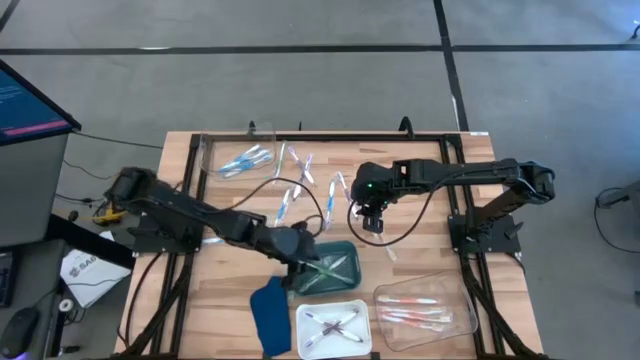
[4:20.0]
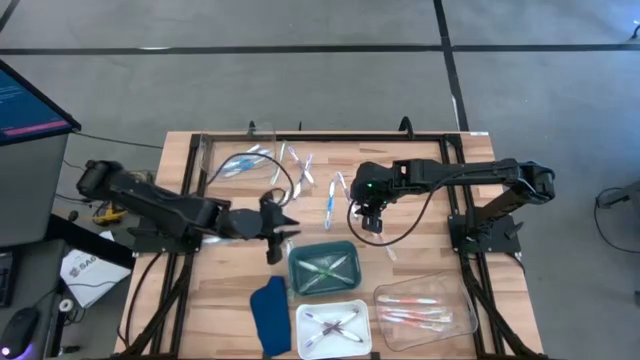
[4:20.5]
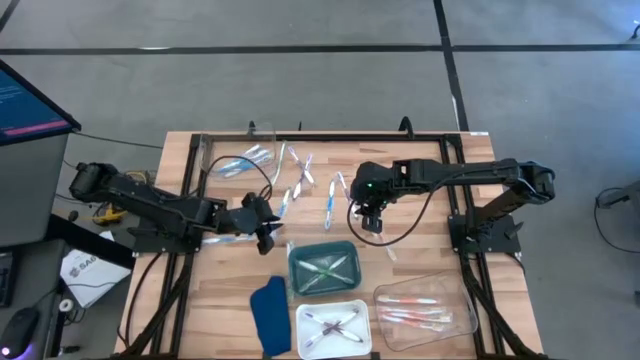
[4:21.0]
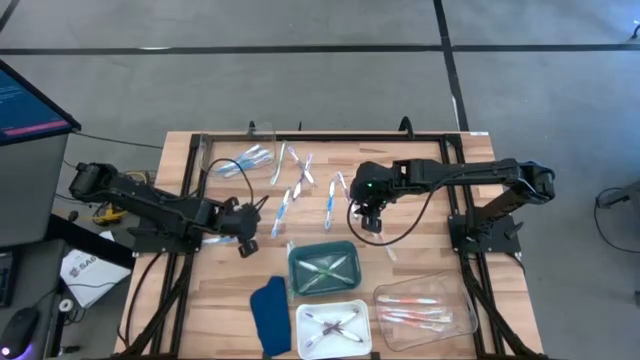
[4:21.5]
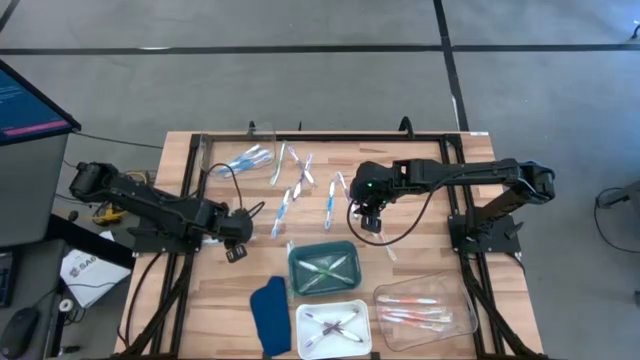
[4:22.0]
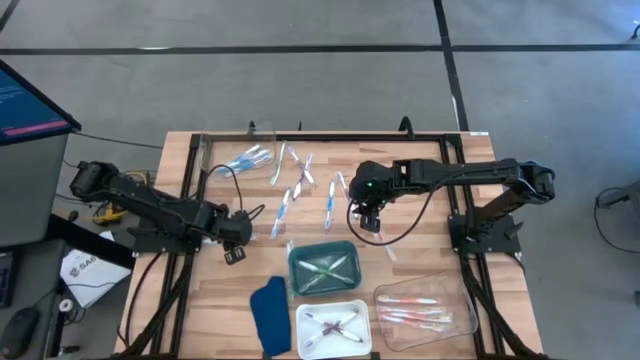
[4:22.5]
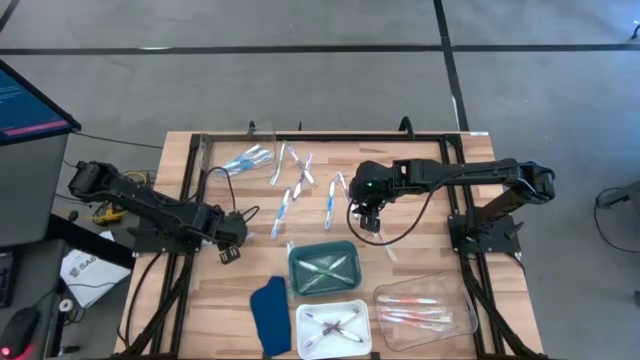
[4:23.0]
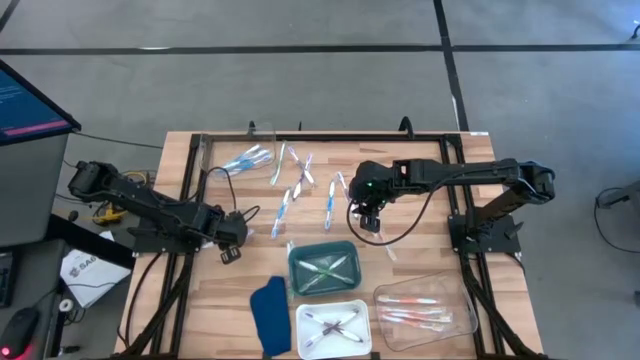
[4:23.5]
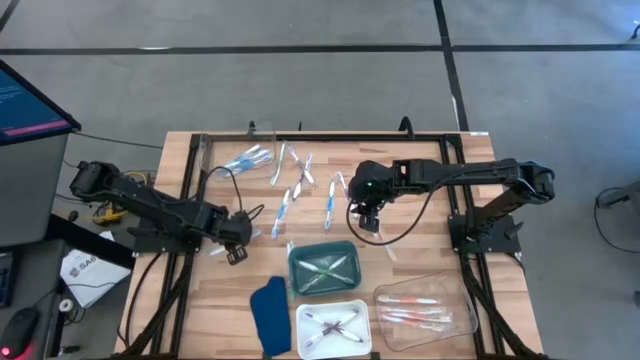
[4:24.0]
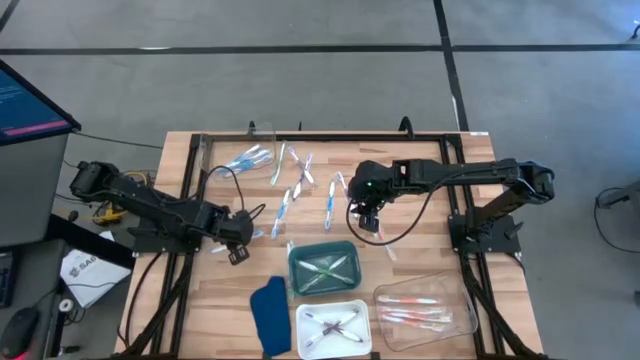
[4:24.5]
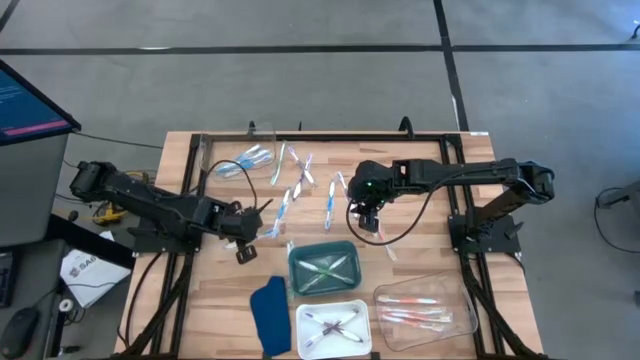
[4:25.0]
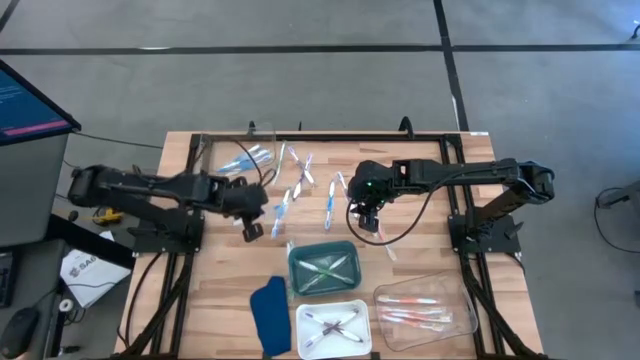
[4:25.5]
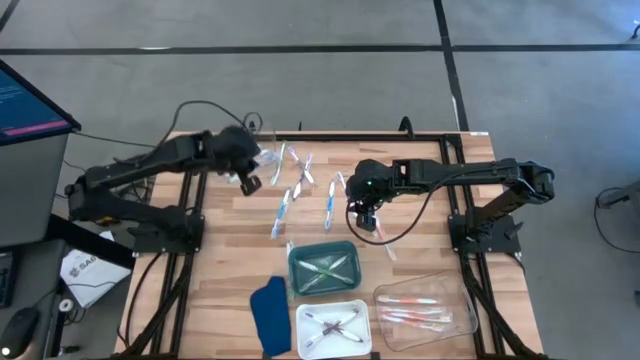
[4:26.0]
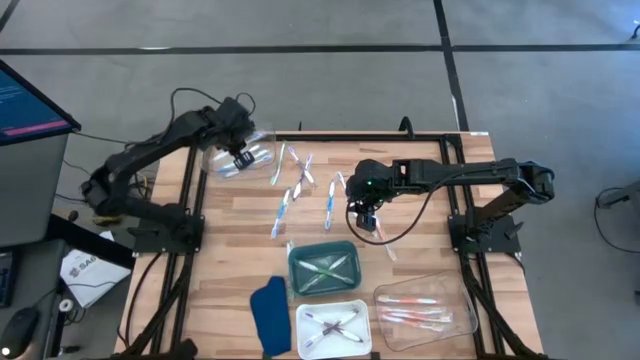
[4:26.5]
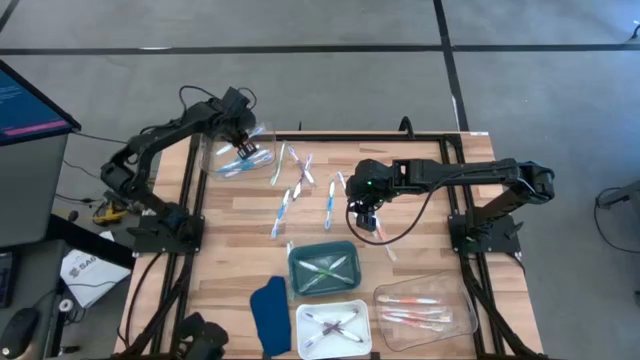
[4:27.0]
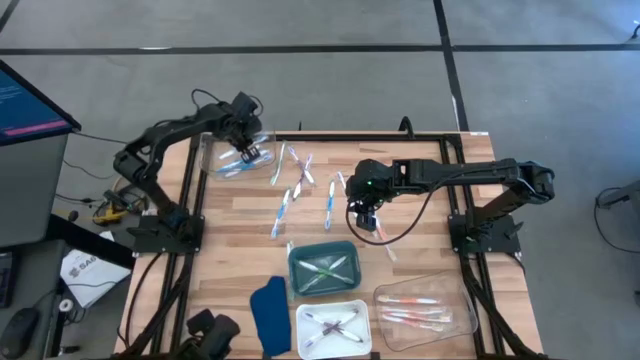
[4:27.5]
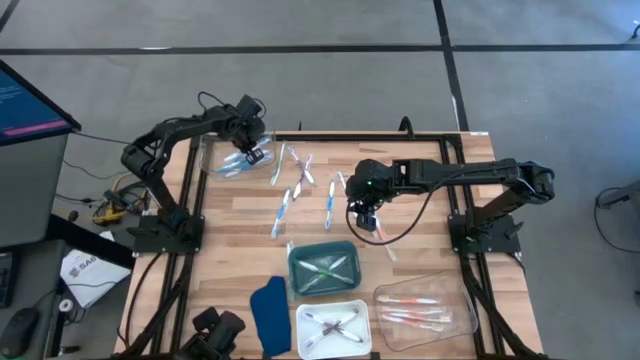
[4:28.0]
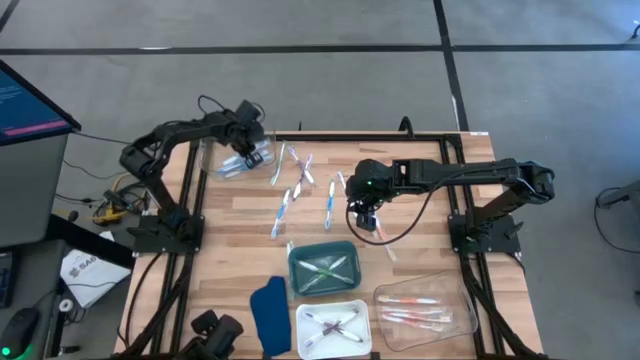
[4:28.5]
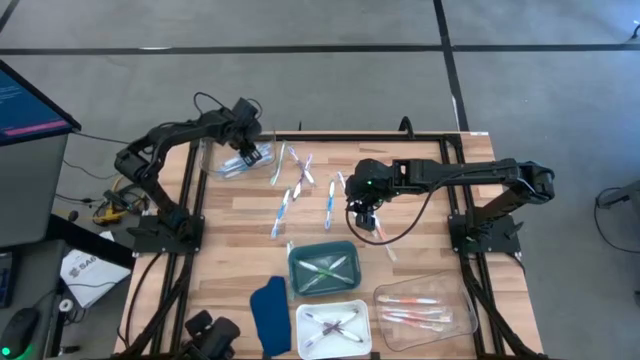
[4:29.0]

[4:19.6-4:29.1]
Task: Pick & Place Toothbrushes
Put the blue toothbrush into the top transparent bin

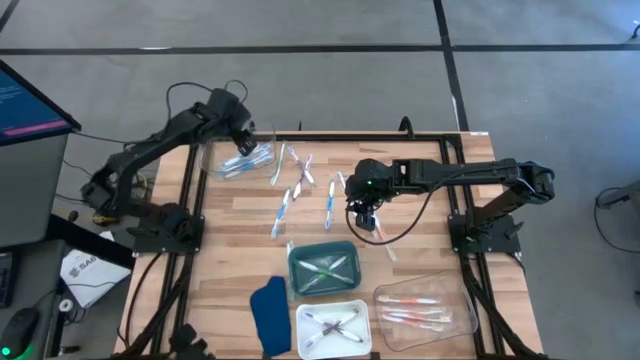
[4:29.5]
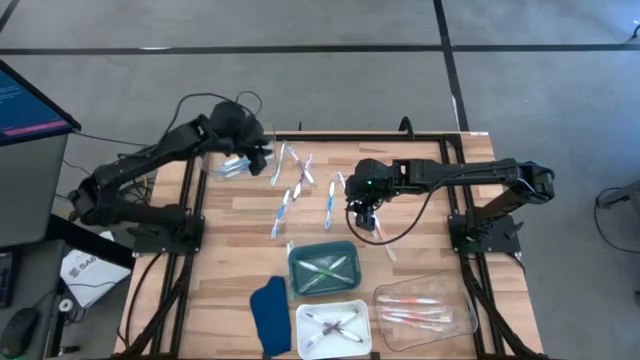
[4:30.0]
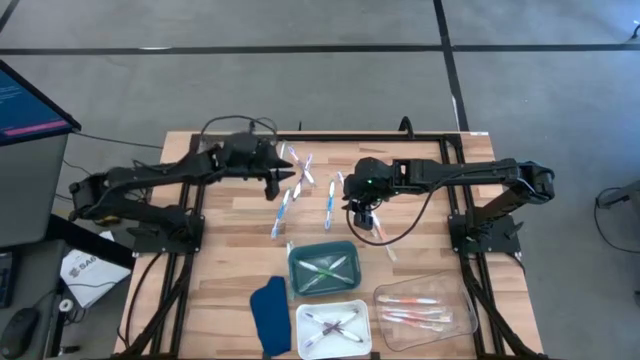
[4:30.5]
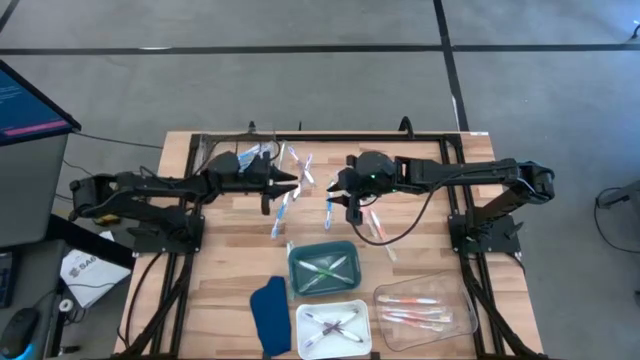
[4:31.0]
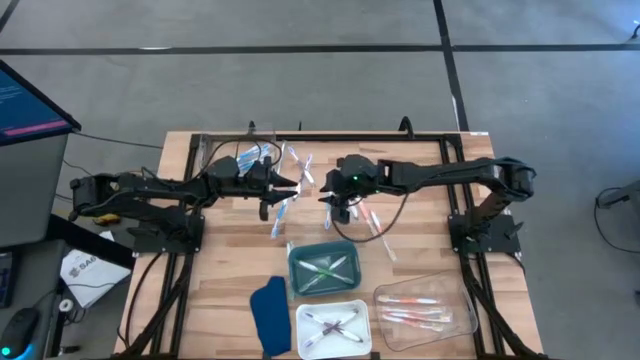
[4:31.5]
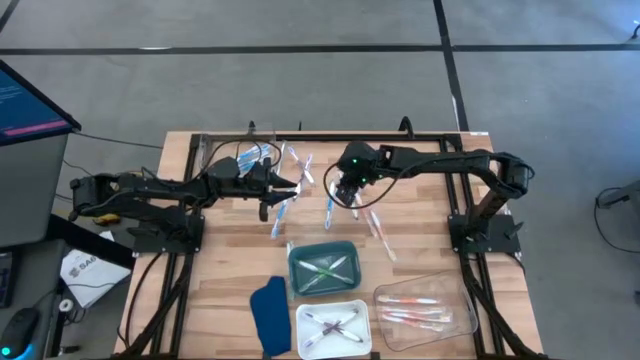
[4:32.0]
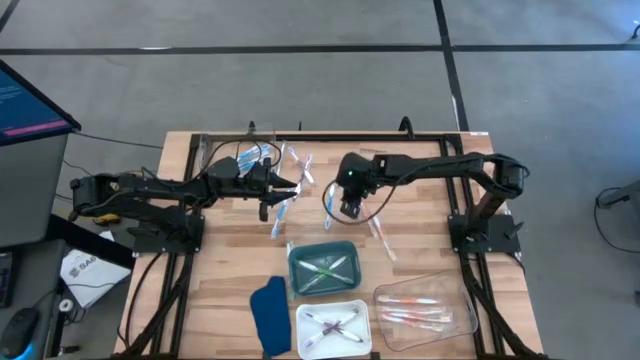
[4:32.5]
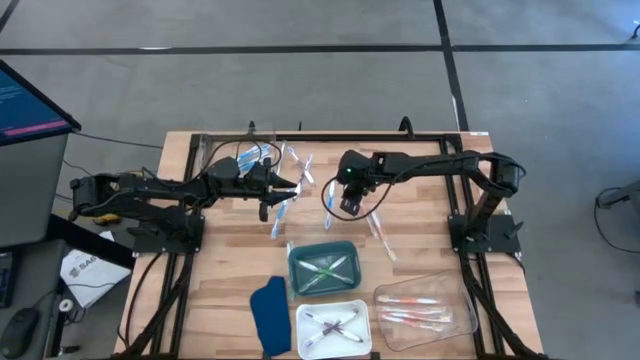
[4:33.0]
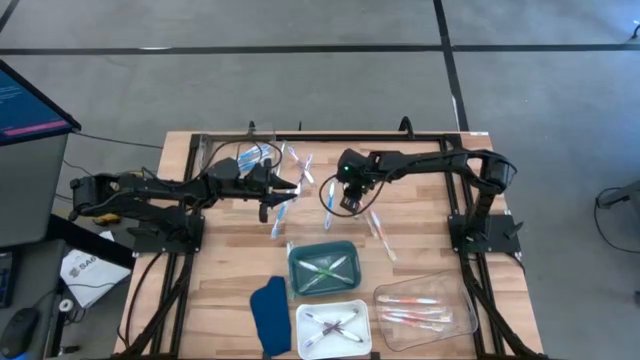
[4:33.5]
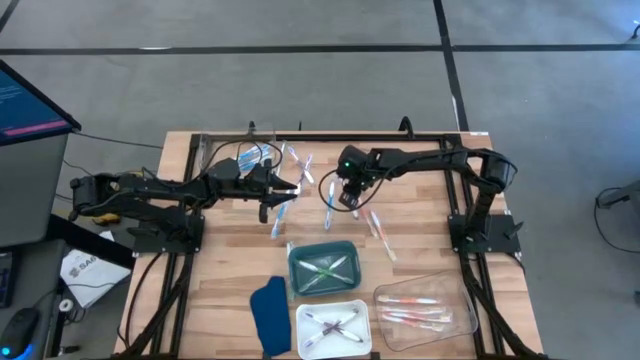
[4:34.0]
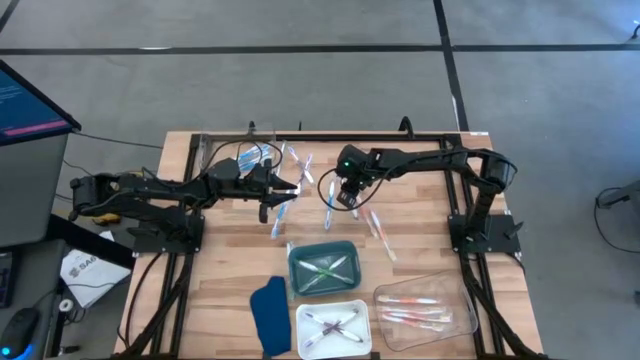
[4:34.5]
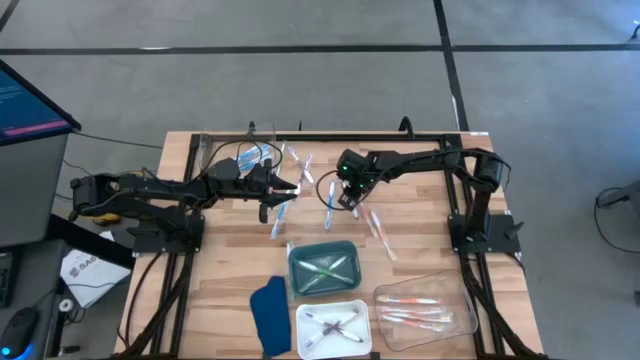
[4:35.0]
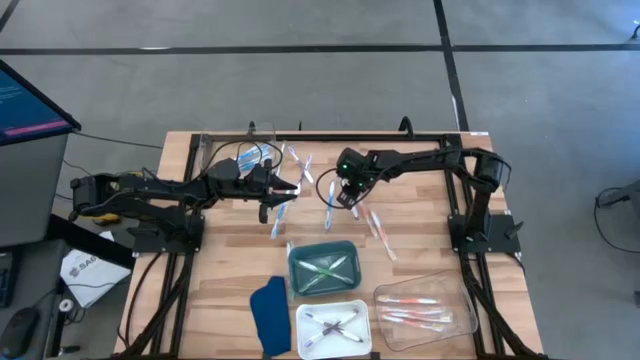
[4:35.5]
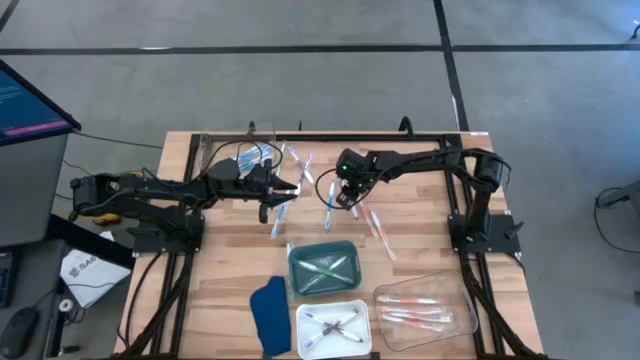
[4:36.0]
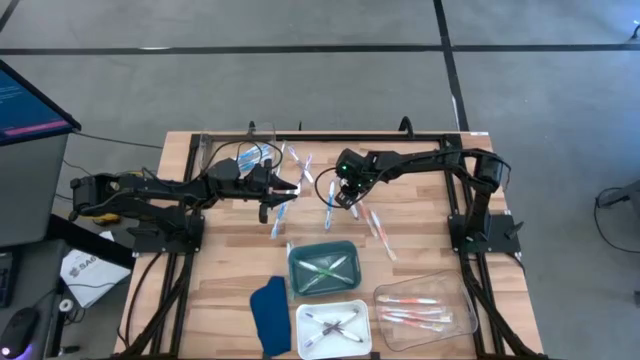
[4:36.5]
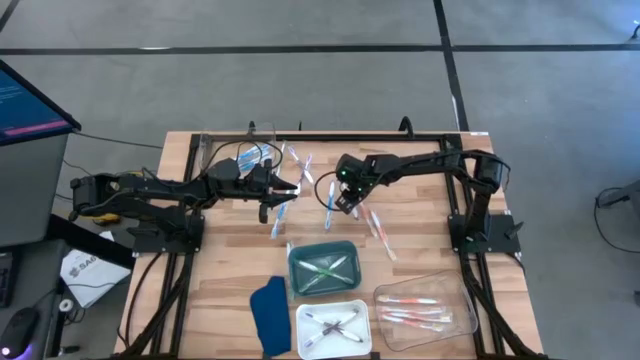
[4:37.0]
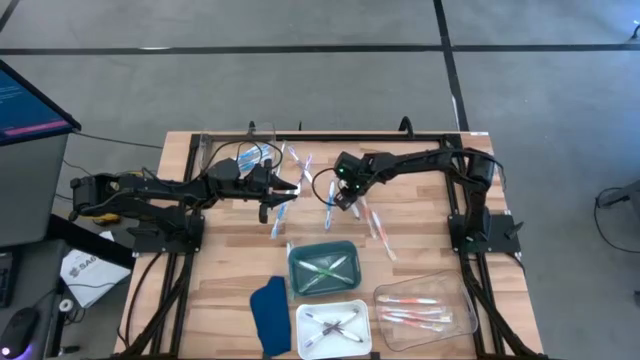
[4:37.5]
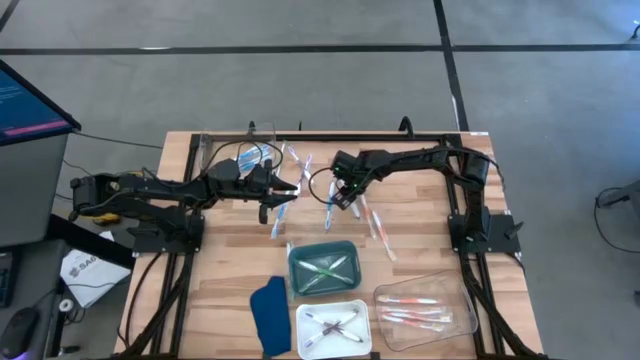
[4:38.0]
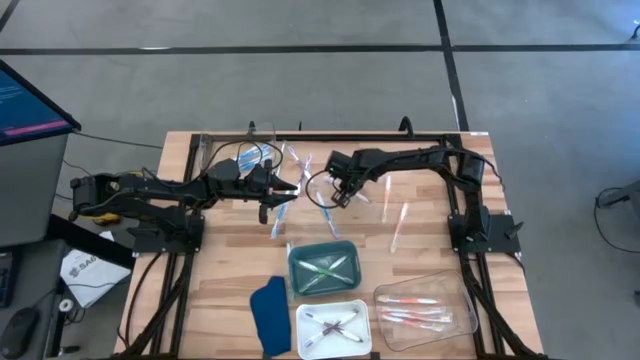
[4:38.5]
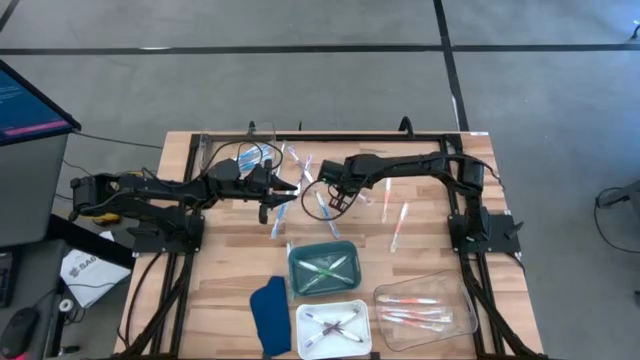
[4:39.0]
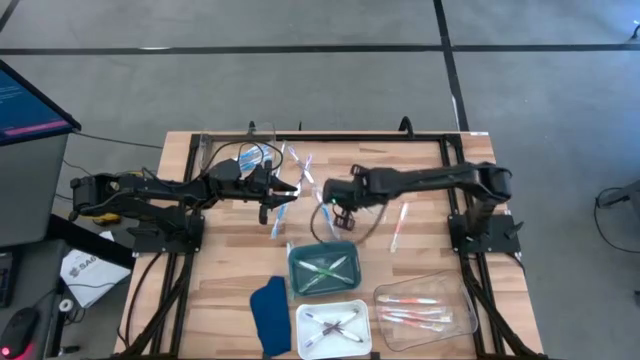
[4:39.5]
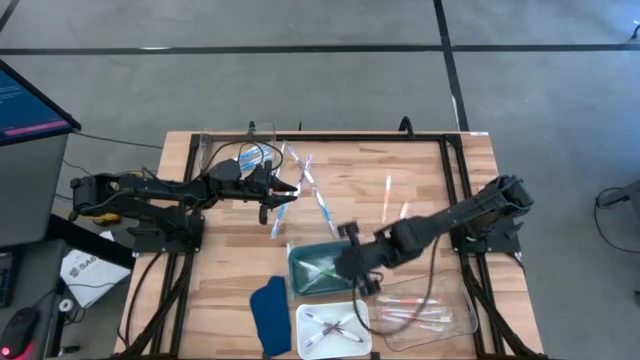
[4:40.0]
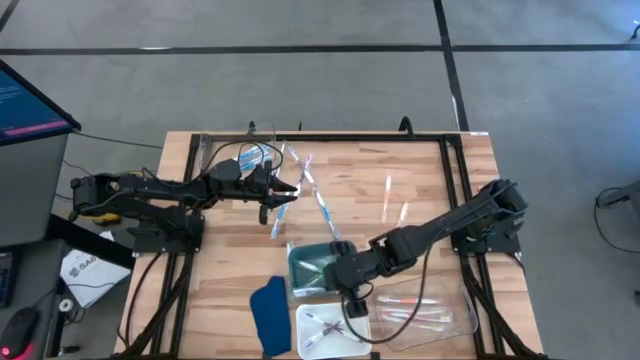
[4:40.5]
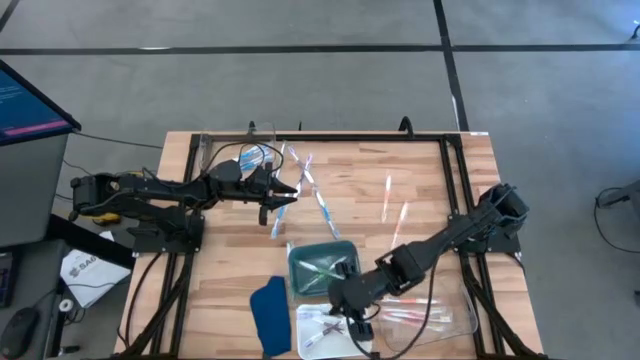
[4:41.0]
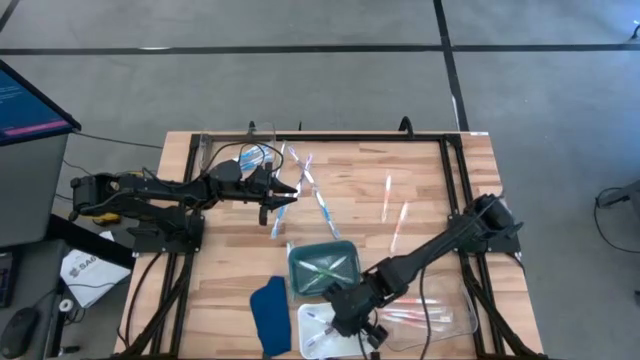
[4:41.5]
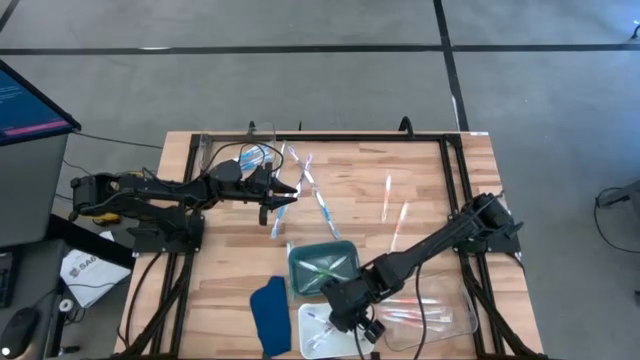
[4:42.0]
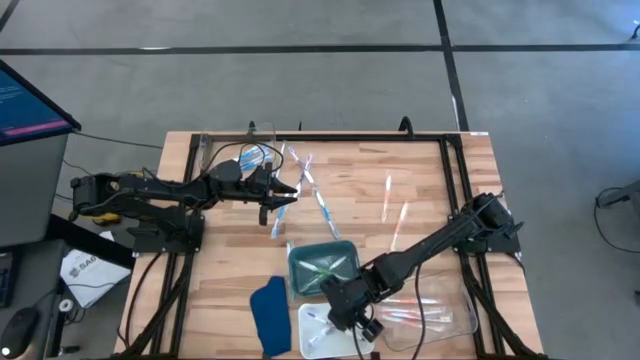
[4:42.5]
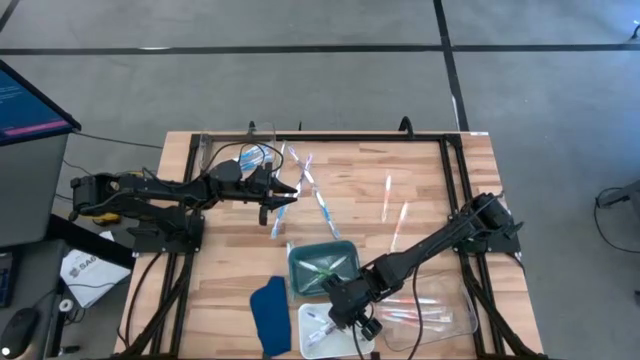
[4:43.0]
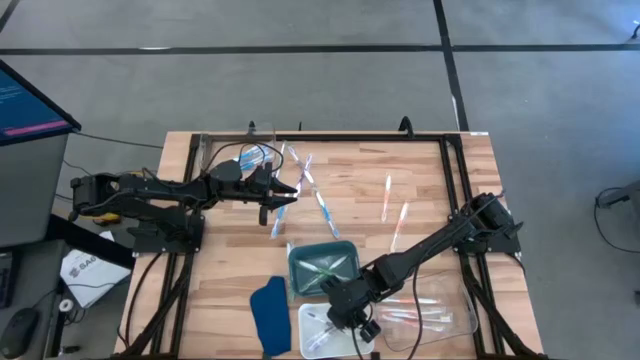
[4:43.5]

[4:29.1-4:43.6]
Put the purple toothbrush into the white bin
